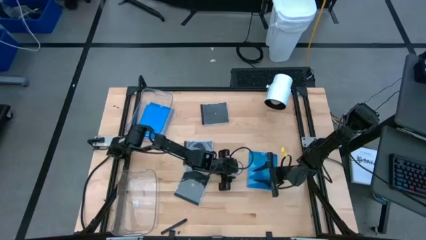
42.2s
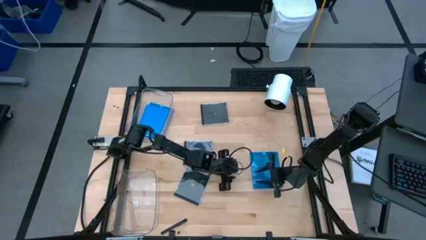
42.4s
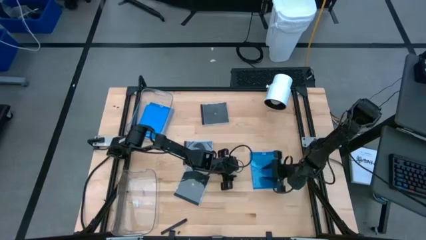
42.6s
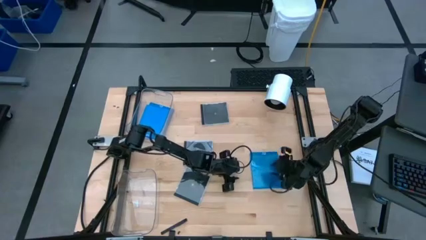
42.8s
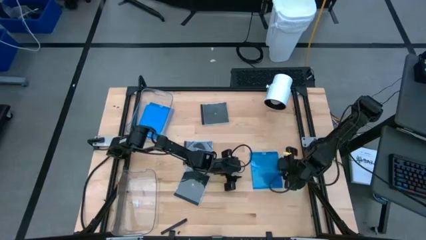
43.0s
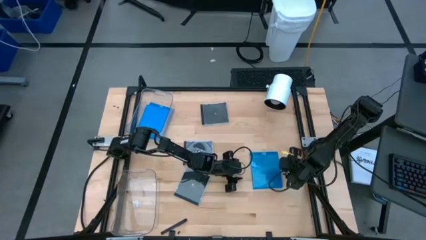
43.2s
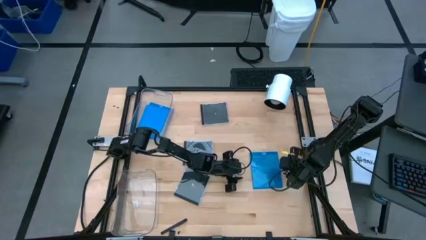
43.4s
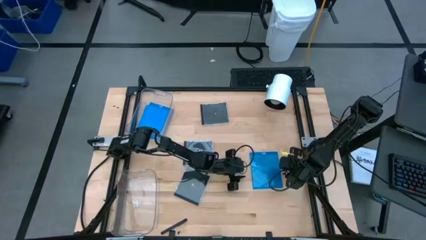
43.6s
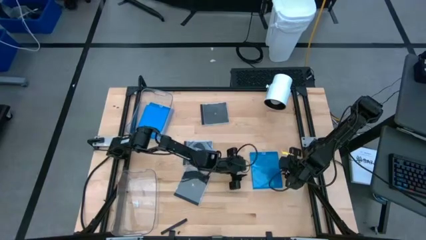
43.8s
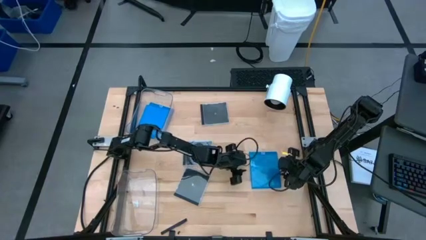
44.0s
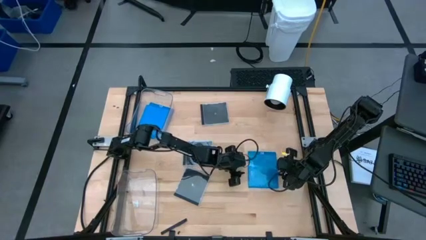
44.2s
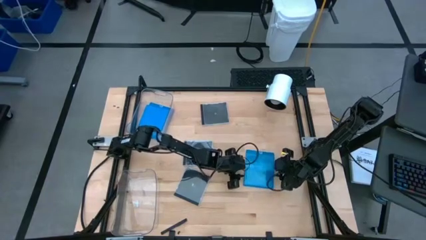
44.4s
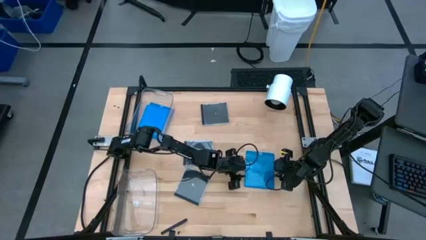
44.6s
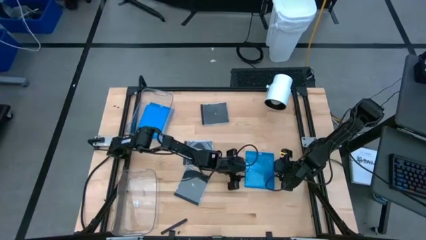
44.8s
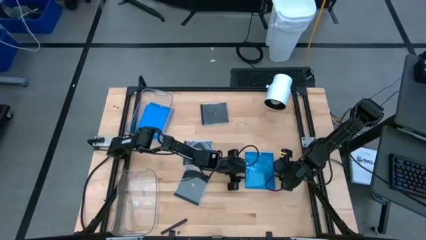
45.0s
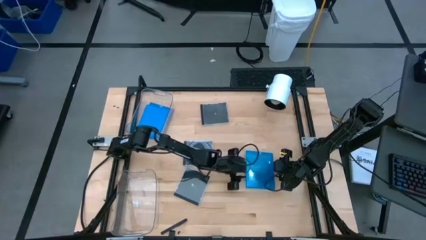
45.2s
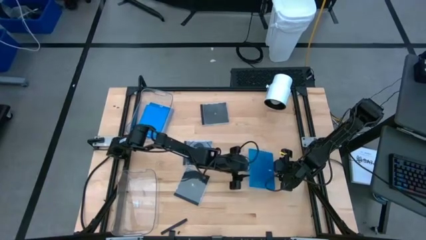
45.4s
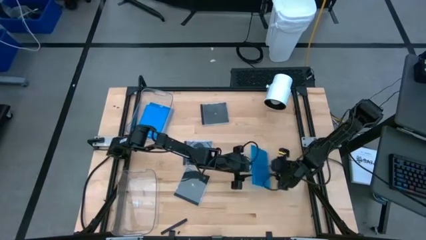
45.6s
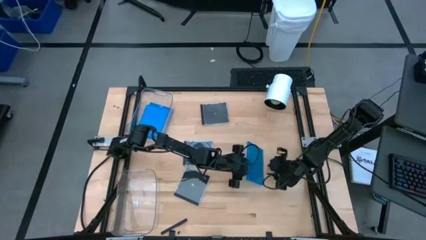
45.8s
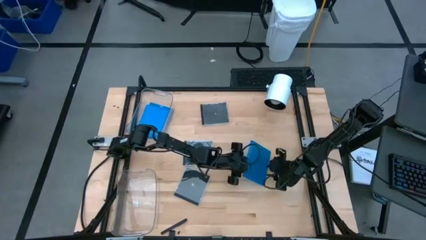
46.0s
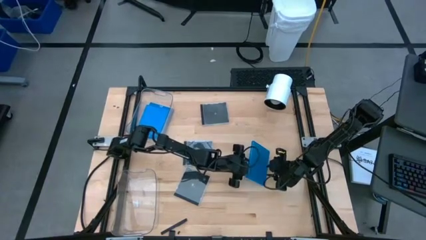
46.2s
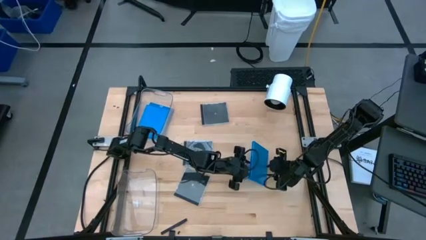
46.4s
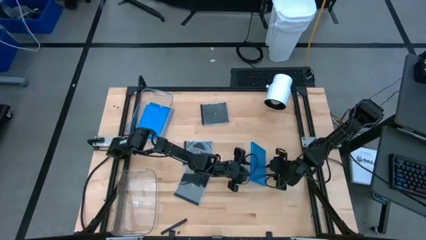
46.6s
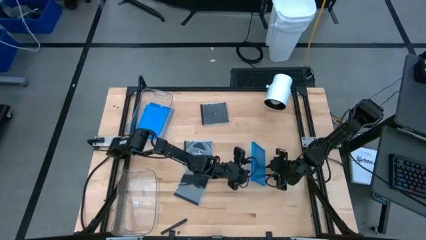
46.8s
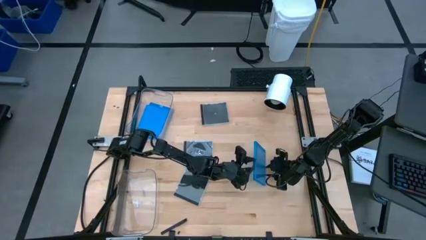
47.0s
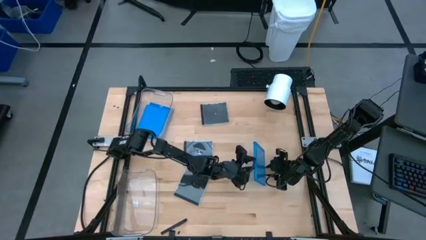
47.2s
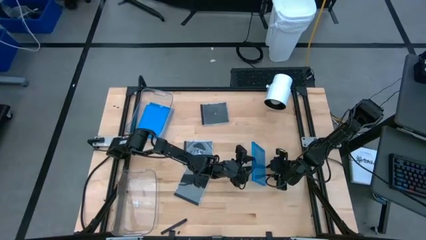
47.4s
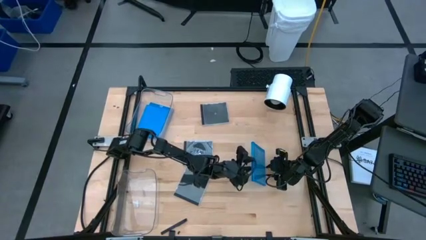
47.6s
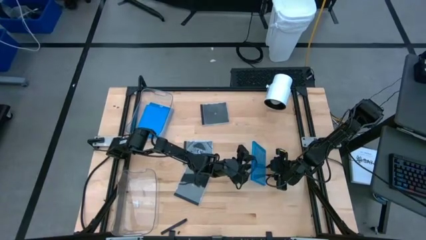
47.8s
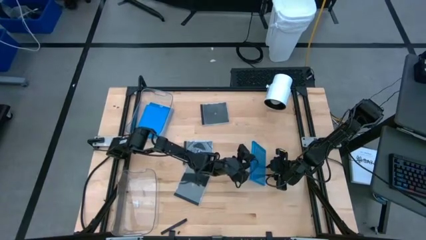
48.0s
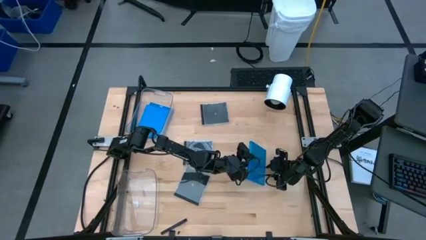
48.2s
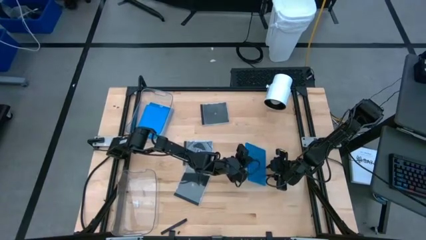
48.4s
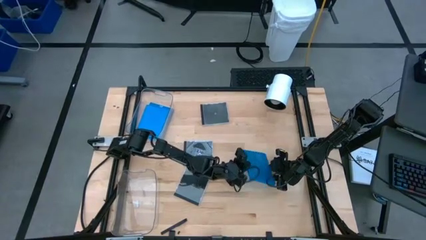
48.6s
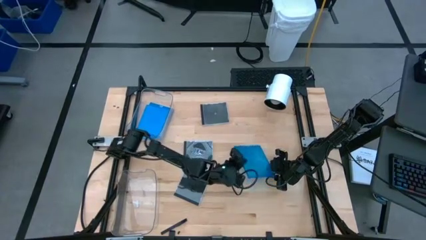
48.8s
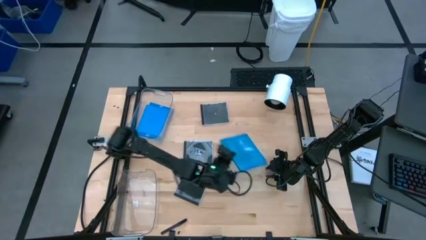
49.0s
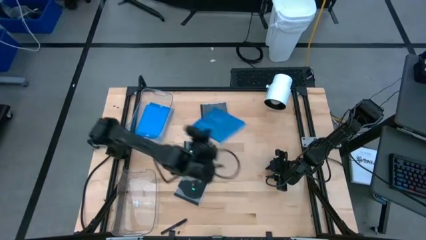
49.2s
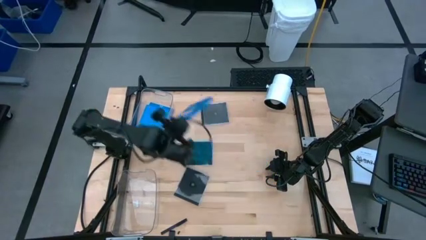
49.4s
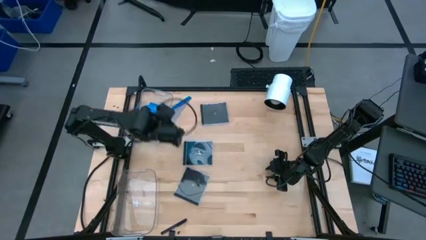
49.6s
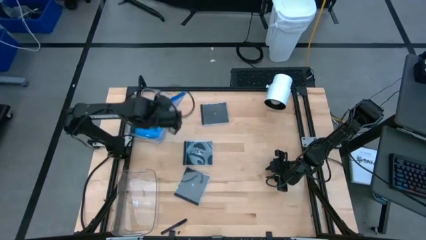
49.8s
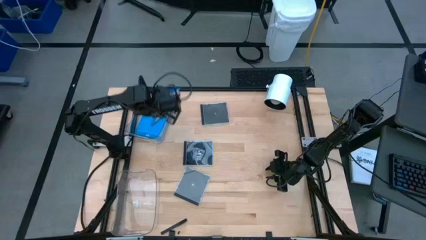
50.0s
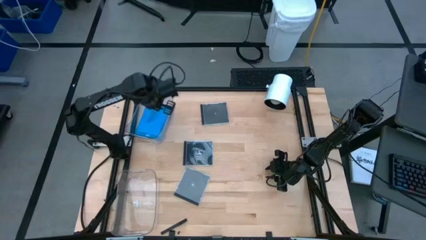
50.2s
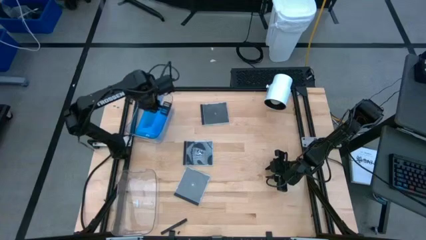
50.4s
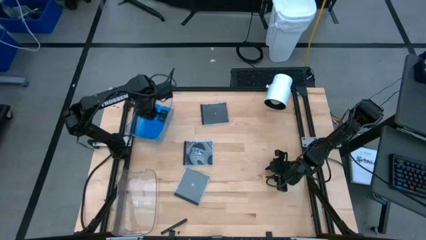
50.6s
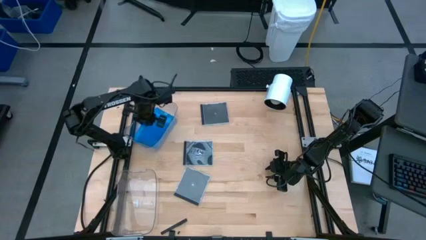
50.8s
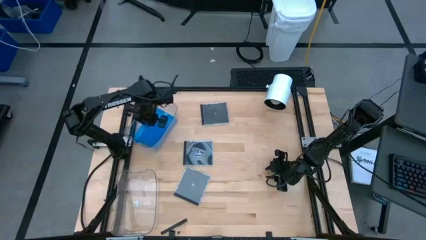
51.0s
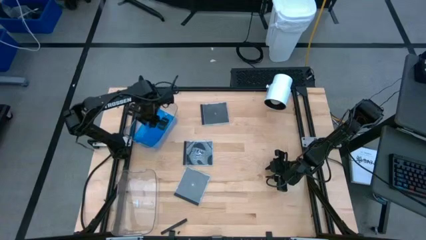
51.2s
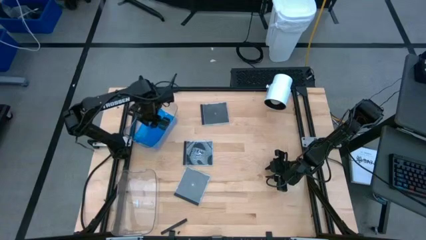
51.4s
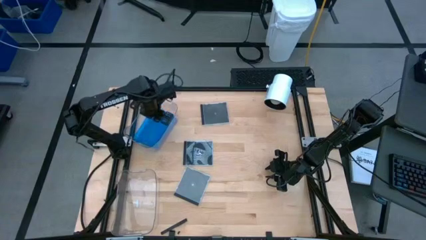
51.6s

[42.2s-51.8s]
Task: Pick & place jewel cases by type
Put the blue CD case into the top transparent bin

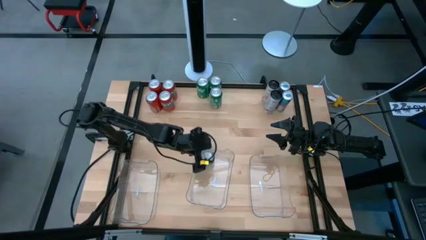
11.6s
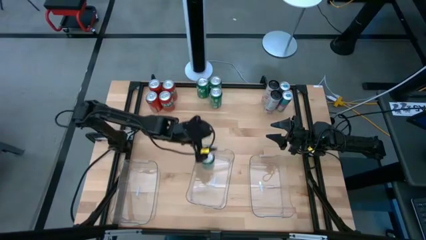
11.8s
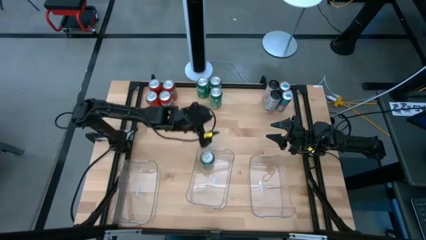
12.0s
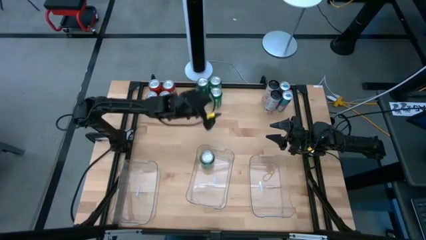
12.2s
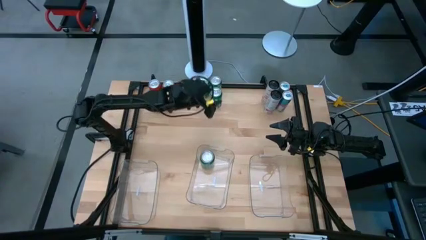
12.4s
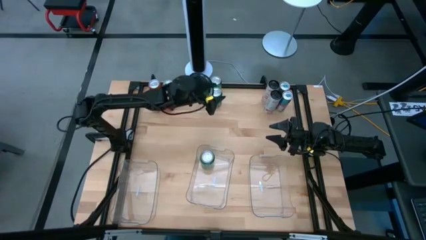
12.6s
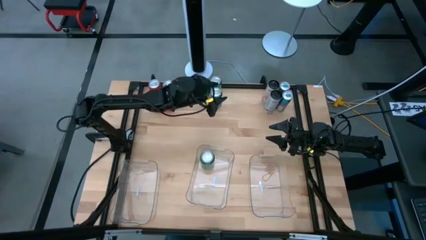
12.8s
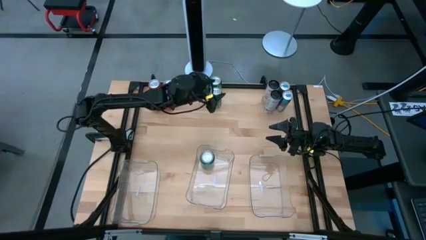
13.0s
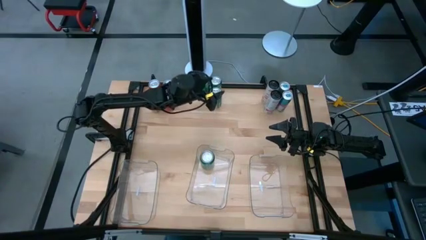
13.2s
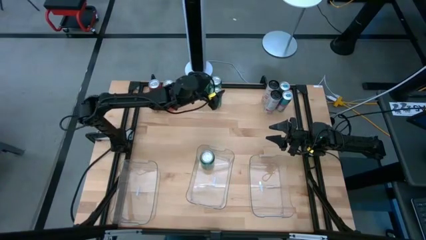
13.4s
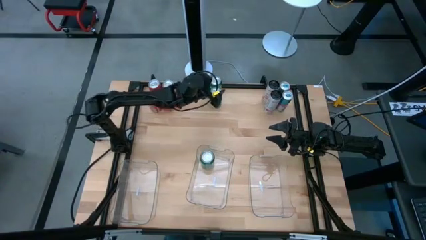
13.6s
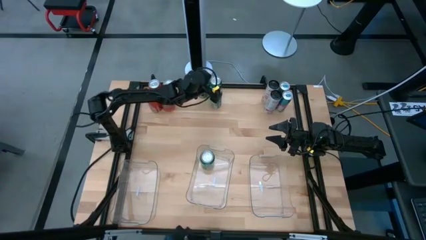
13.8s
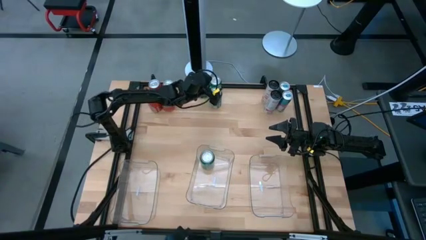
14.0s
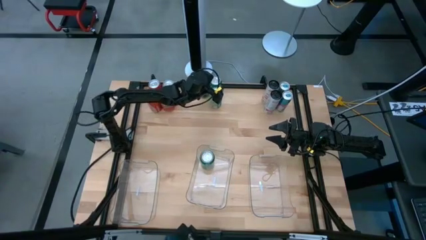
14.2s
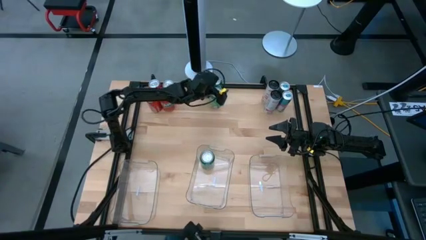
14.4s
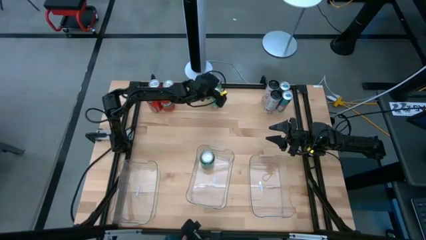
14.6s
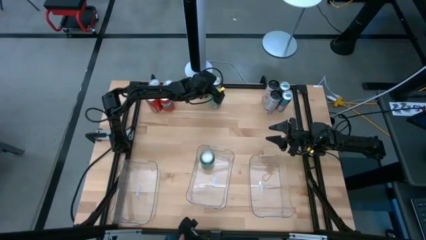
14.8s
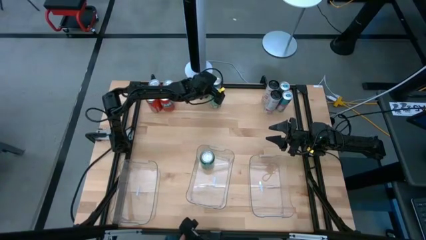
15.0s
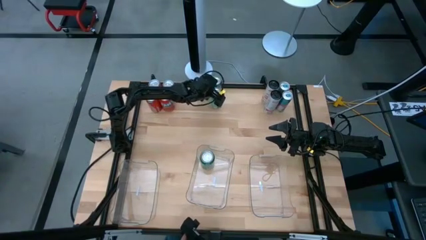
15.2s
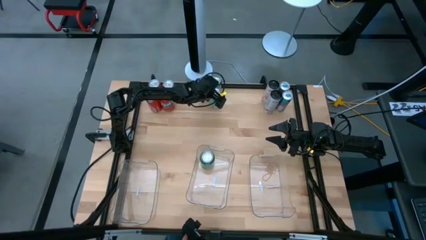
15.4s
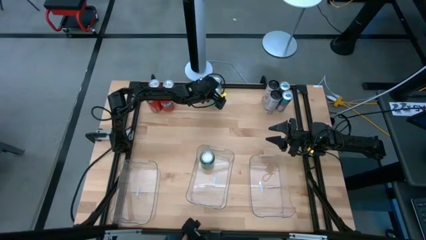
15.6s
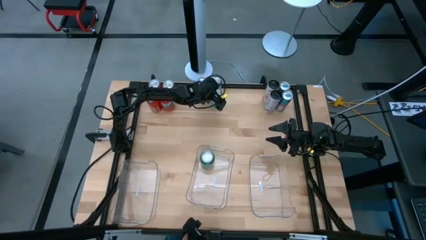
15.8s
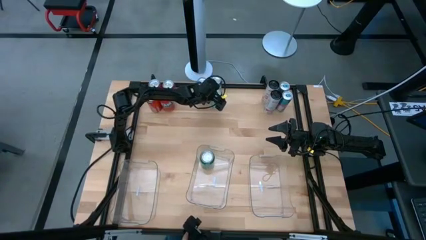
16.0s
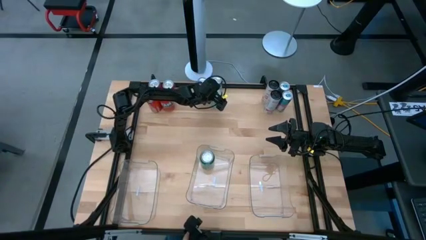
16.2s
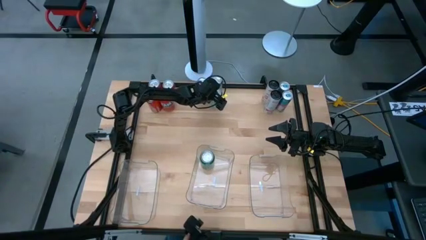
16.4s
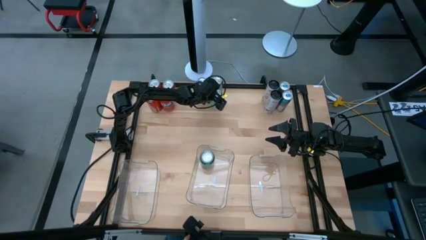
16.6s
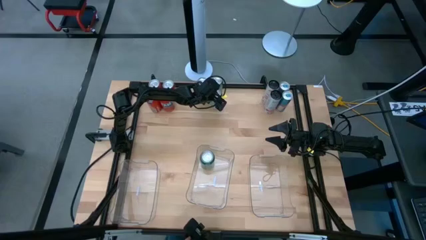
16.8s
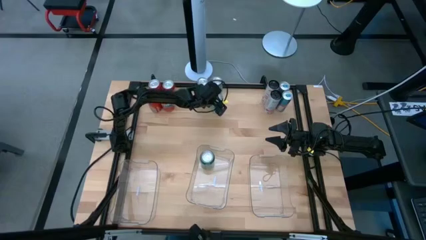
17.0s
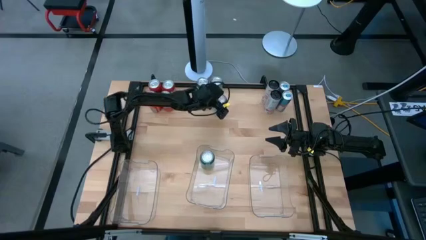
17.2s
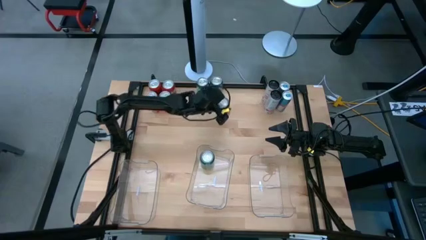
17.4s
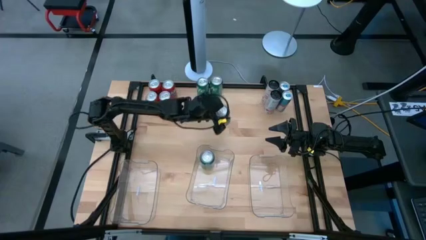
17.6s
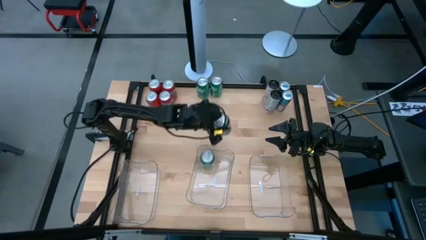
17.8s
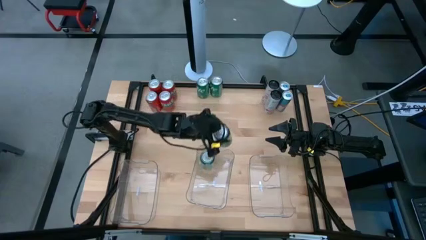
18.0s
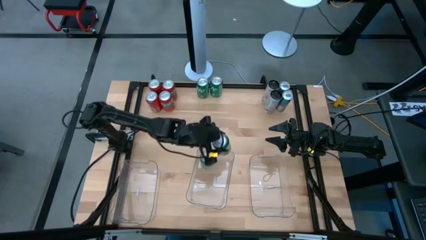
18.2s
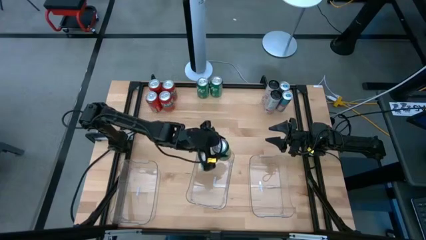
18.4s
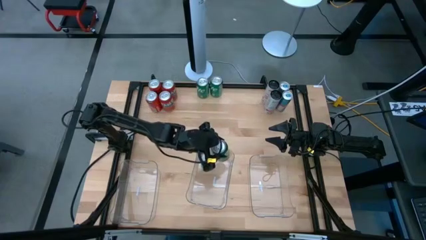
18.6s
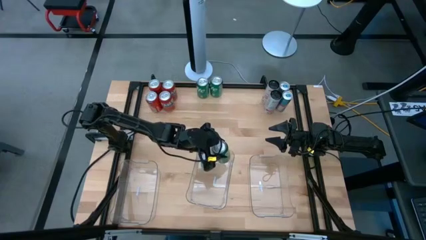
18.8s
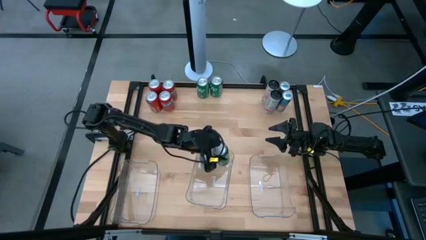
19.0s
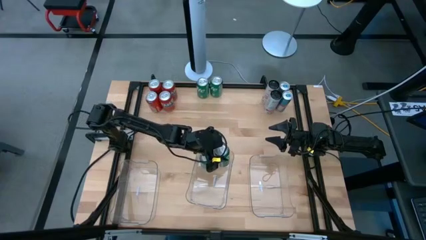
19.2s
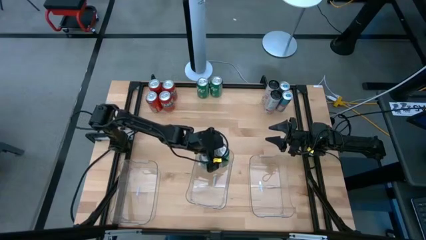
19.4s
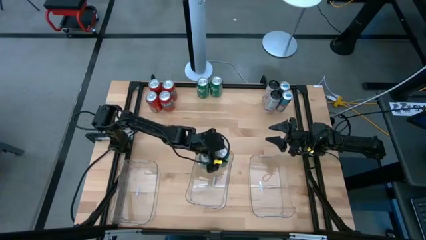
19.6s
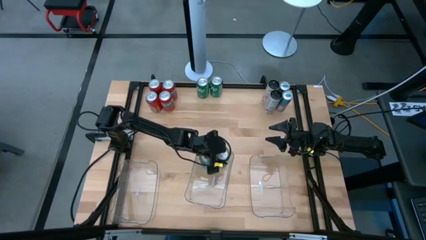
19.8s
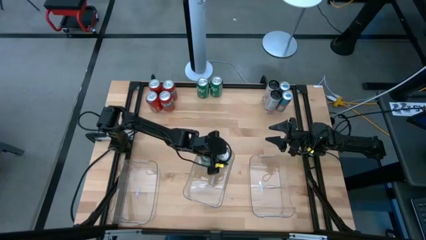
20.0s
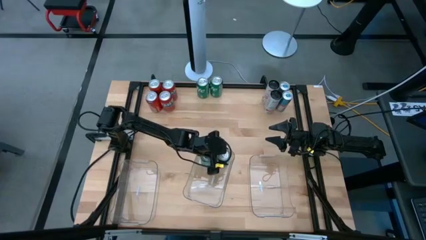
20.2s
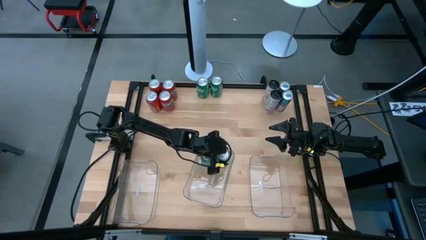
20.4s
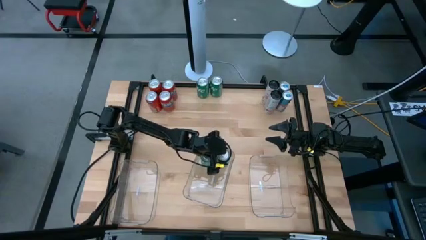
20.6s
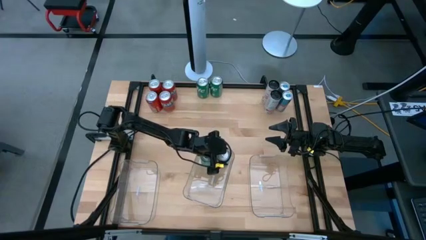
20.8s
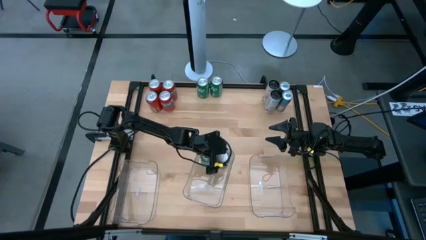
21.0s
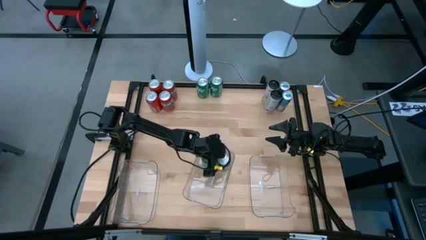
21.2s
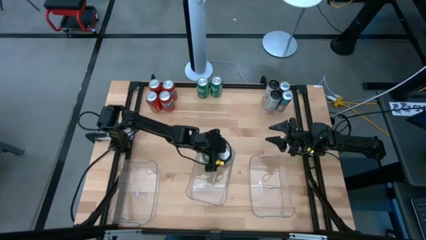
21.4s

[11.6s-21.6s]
Task: Sort soda cans
Put the green soda can into the middle transparent bin
